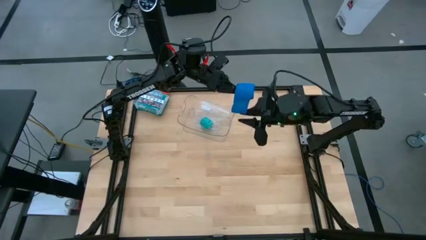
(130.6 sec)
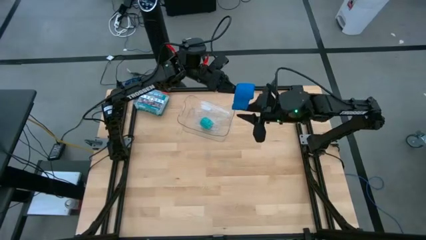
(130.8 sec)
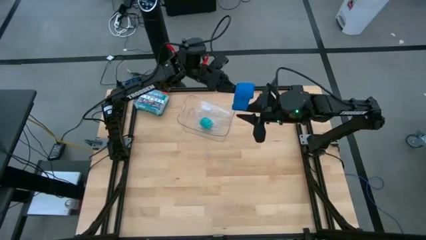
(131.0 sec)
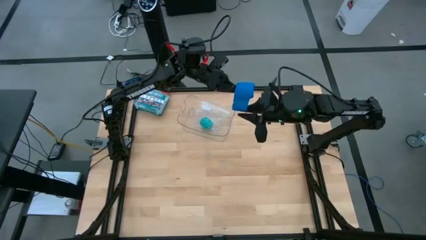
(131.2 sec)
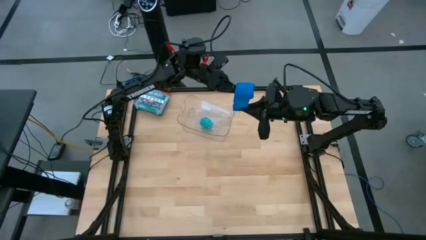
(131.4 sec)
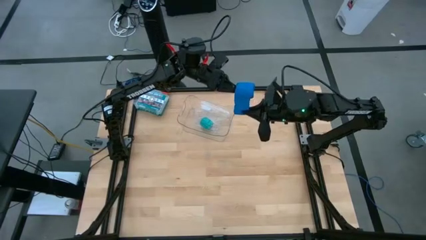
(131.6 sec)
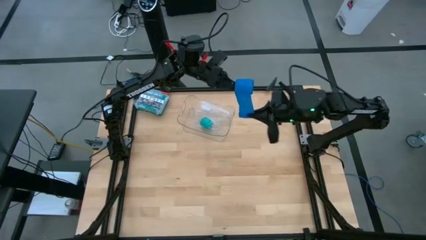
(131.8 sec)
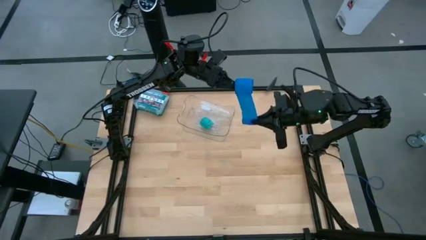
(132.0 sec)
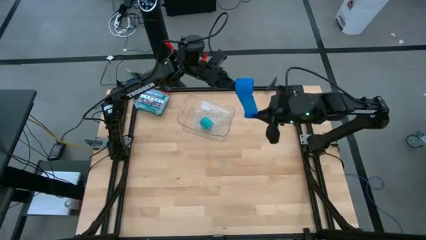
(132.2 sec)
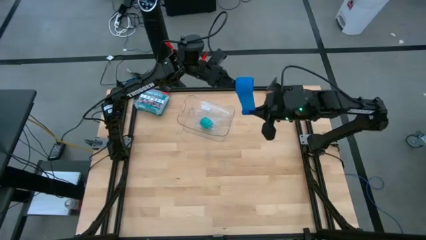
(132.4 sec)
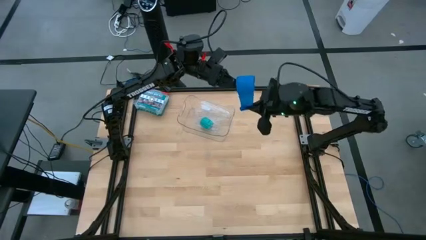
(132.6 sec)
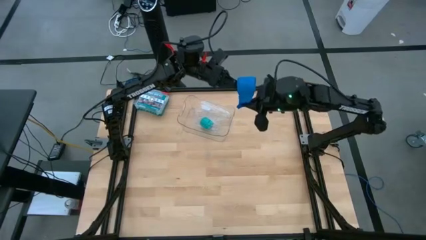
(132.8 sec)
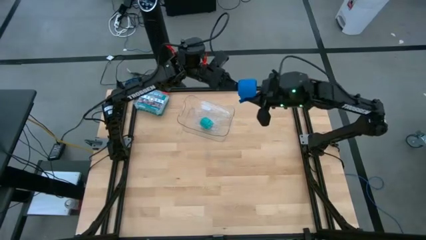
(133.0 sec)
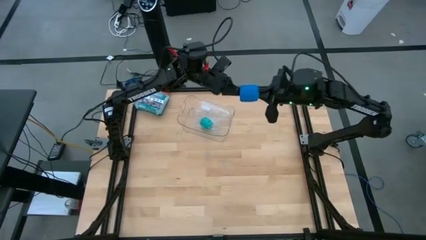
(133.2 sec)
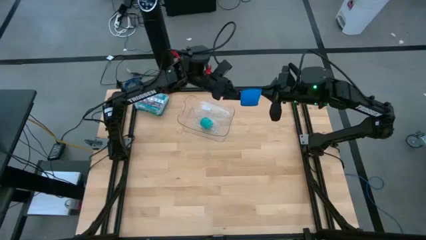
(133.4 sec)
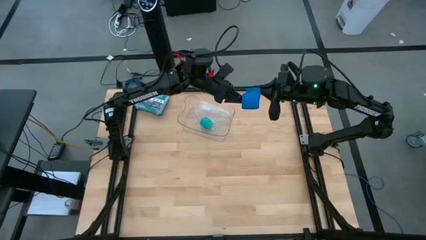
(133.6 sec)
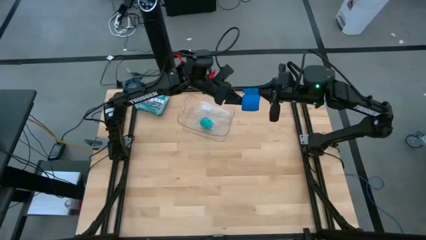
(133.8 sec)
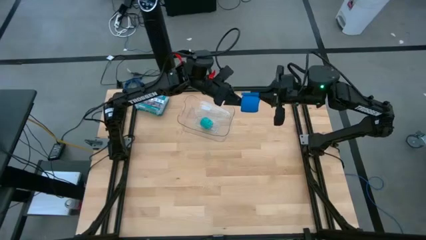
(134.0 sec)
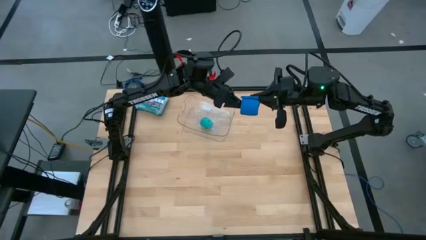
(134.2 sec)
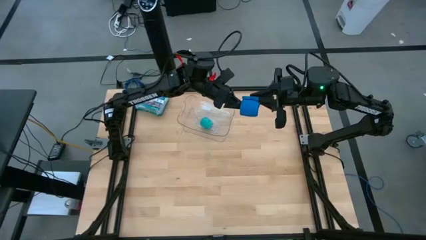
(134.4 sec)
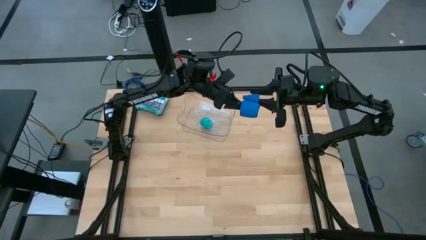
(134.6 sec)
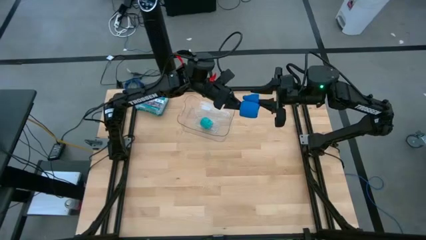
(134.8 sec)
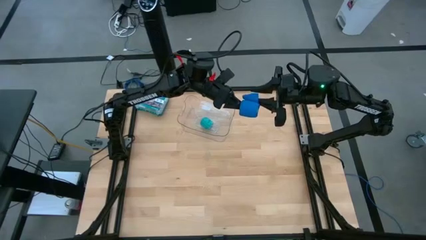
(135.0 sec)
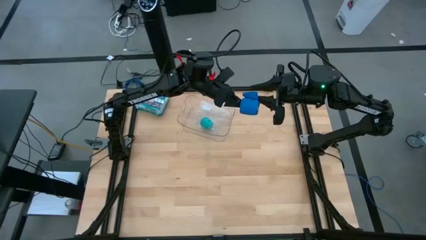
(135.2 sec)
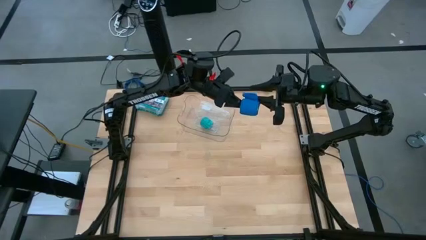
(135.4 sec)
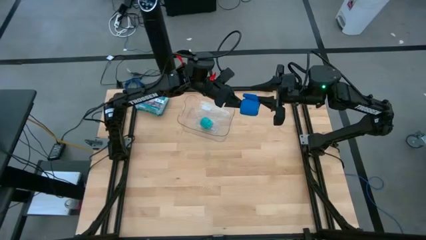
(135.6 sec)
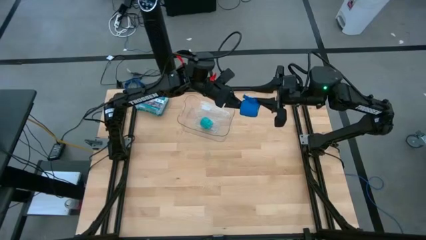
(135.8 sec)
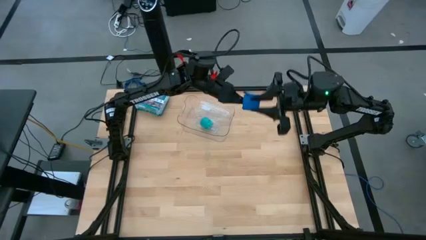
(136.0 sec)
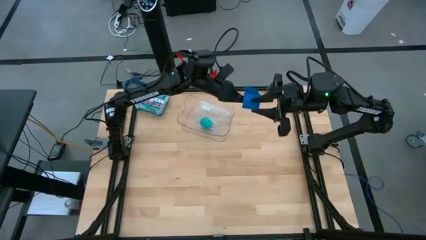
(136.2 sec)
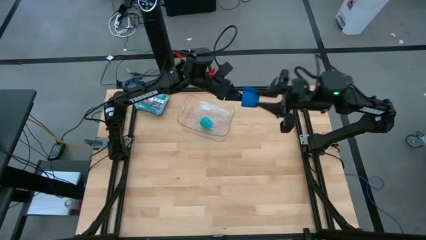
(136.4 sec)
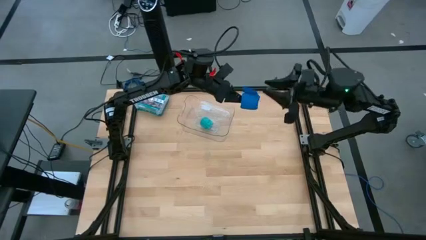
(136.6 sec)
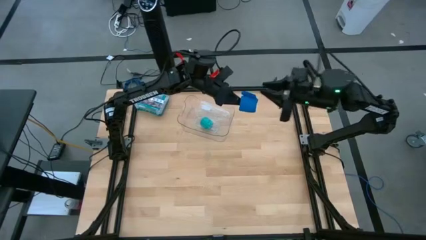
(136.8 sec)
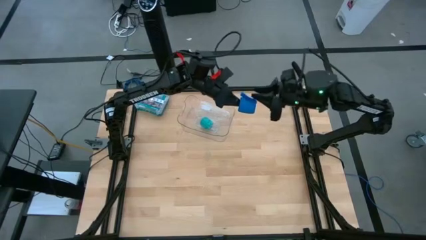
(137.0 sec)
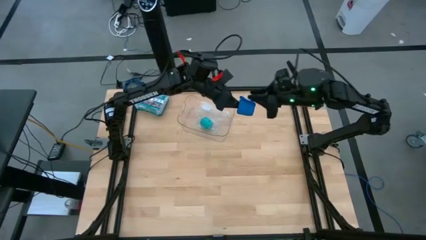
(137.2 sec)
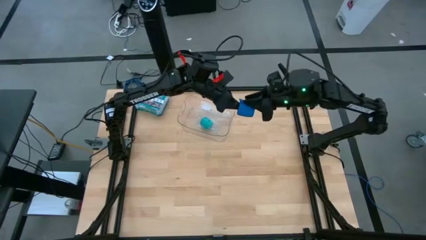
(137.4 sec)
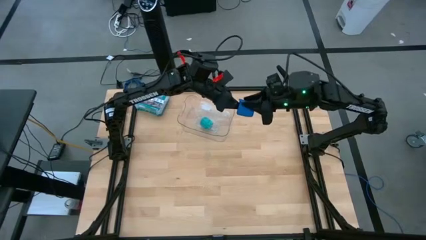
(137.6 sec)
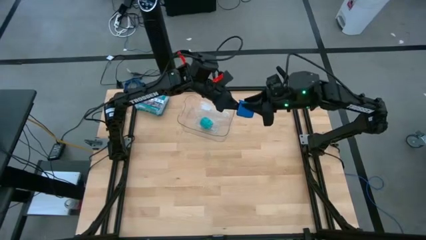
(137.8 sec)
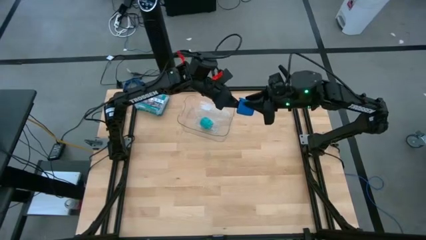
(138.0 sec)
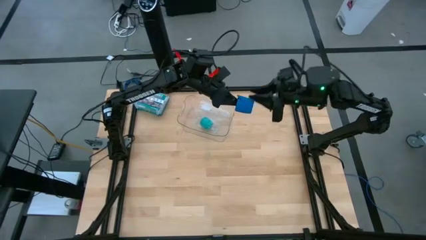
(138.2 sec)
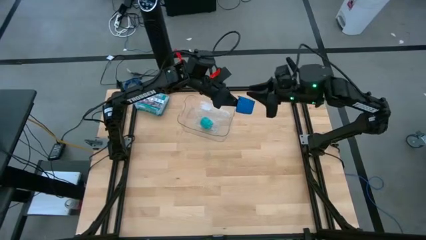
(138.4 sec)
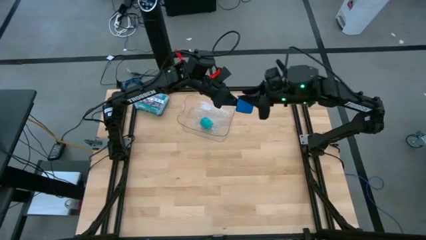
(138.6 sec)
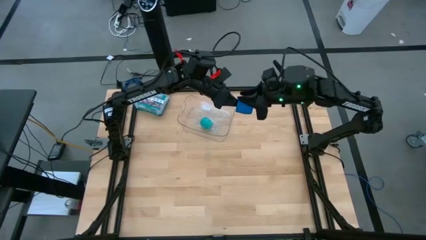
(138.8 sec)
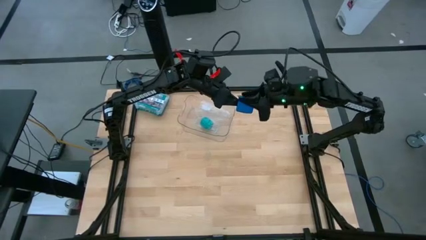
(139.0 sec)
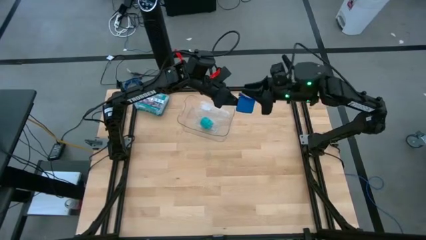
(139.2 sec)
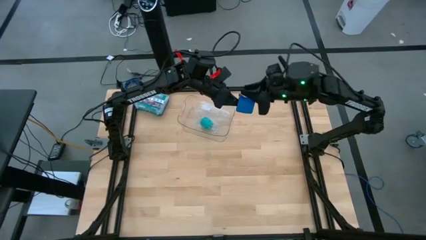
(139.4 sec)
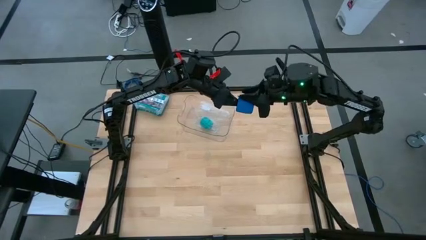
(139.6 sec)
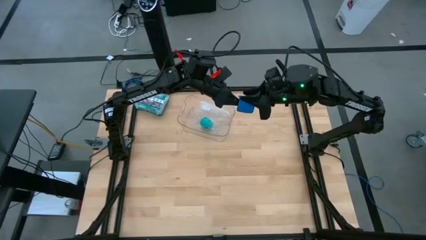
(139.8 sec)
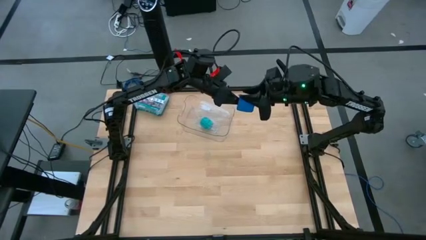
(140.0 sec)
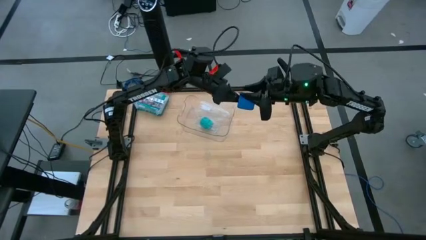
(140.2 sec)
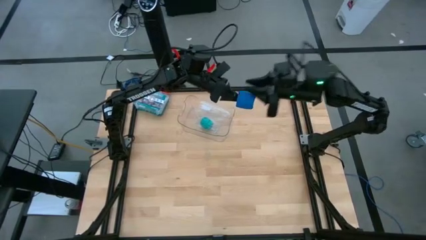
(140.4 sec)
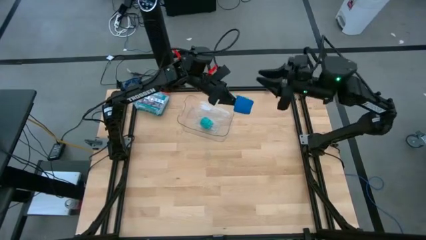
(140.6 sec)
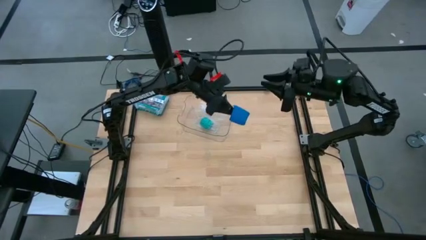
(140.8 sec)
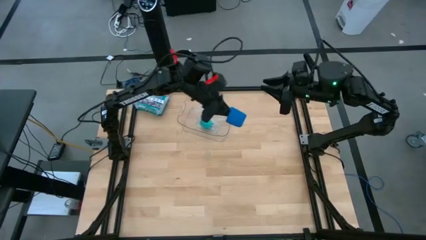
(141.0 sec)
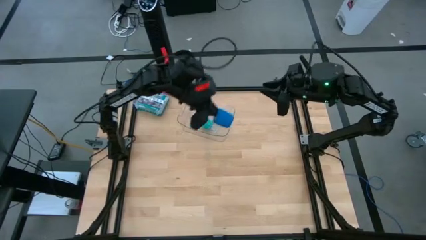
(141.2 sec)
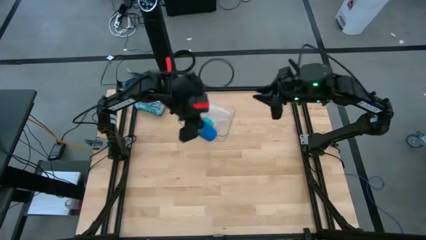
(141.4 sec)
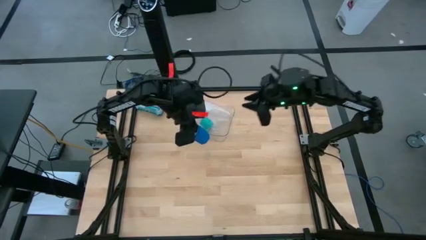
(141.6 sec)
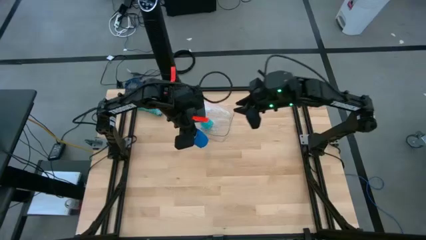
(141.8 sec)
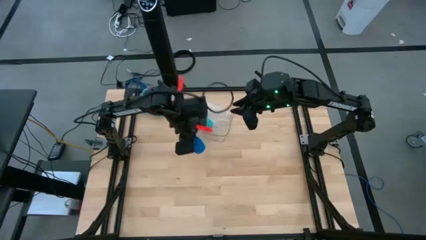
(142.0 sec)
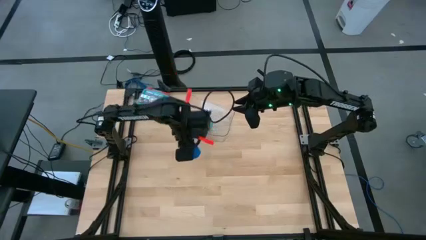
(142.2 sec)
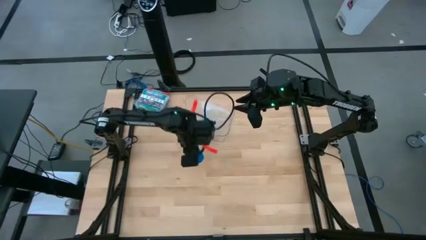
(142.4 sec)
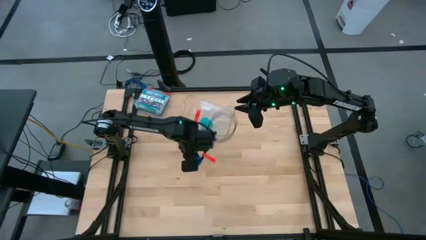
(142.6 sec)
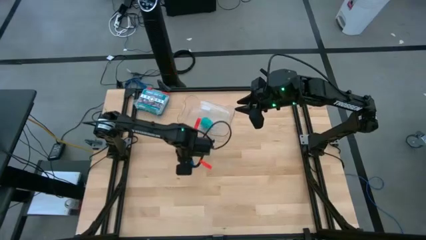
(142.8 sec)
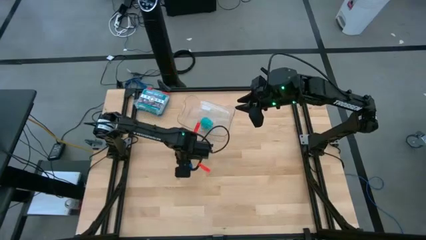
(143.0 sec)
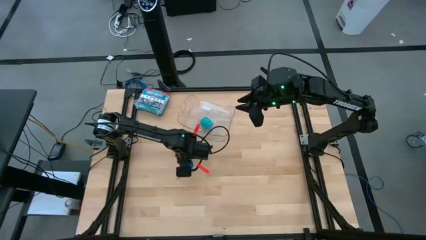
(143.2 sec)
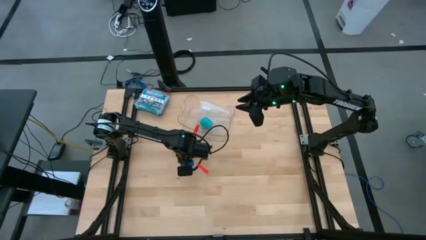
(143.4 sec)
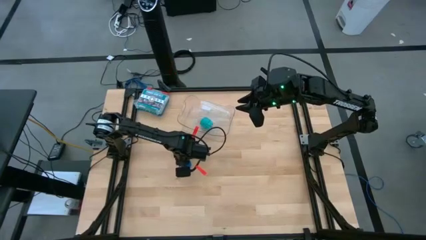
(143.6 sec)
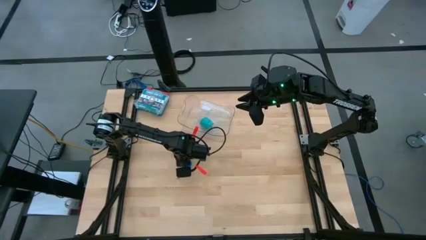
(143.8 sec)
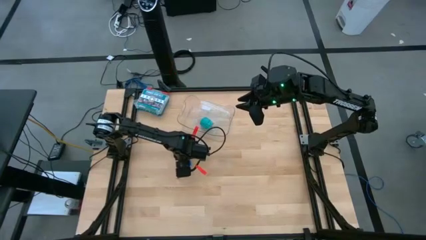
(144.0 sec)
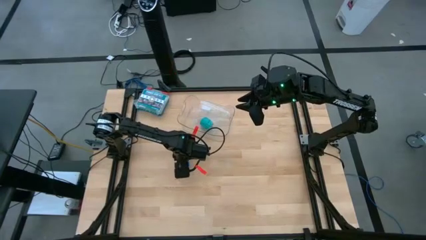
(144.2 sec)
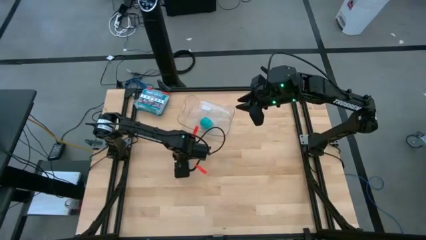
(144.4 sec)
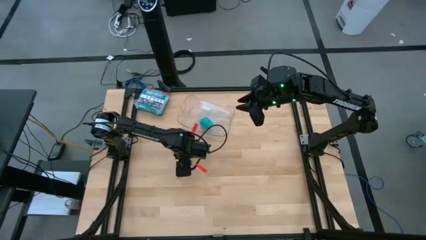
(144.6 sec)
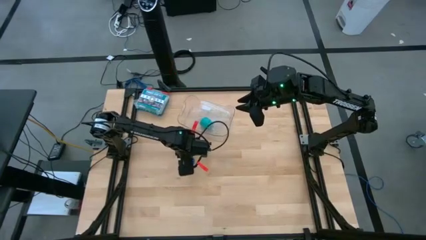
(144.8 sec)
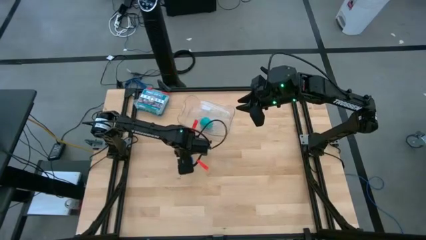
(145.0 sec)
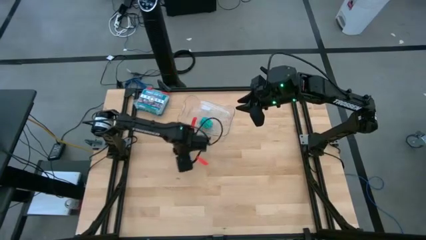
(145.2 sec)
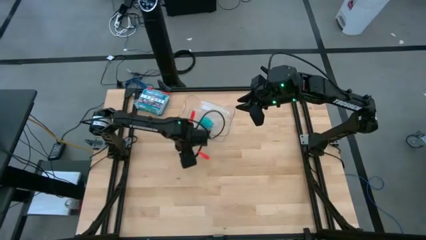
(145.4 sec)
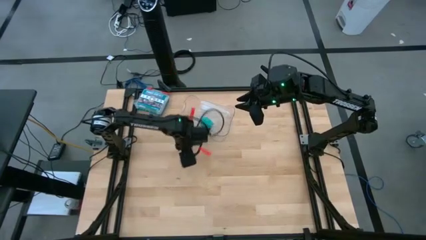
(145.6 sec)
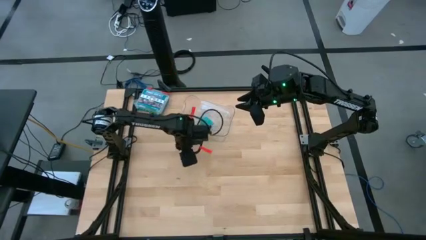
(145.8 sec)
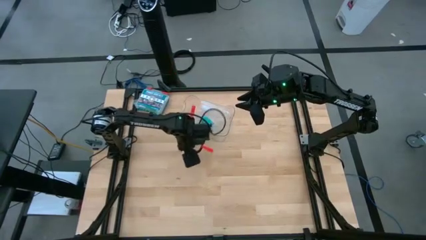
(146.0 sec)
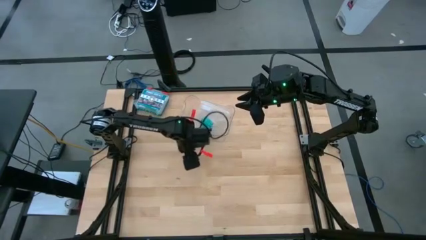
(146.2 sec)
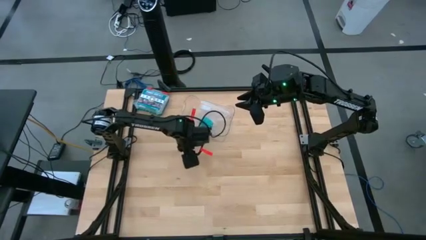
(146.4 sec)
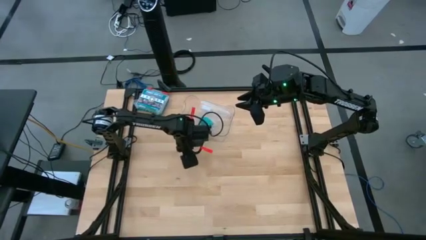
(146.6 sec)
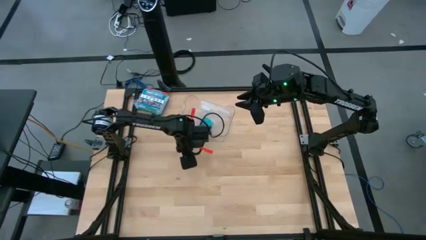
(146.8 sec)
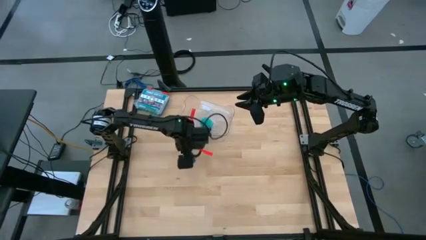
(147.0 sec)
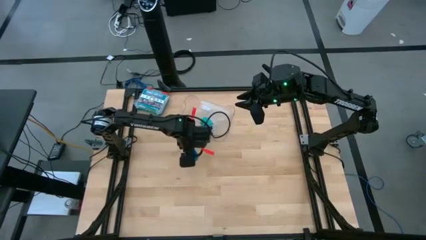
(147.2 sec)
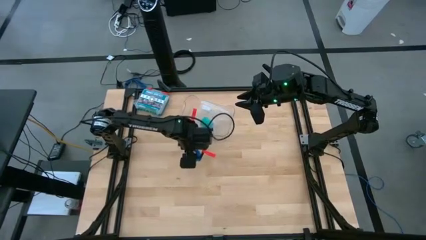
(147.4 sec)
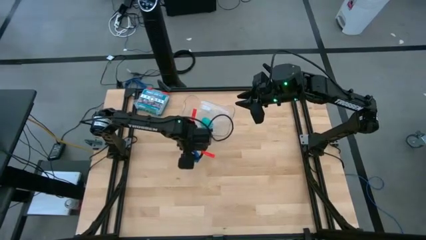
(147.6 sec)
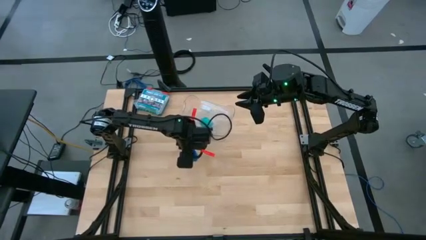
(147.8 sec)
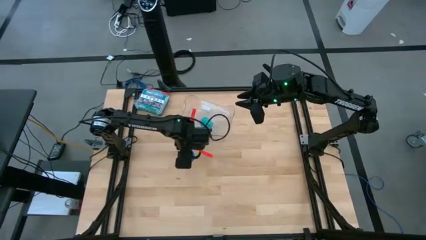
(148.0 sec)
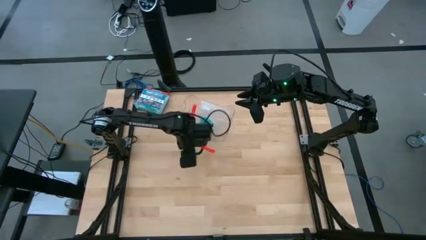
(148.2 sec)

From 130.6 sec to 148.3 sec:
Task: Roll bandage
Roll the blue bandage
